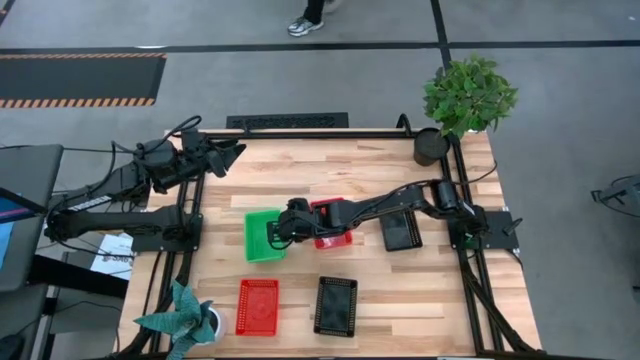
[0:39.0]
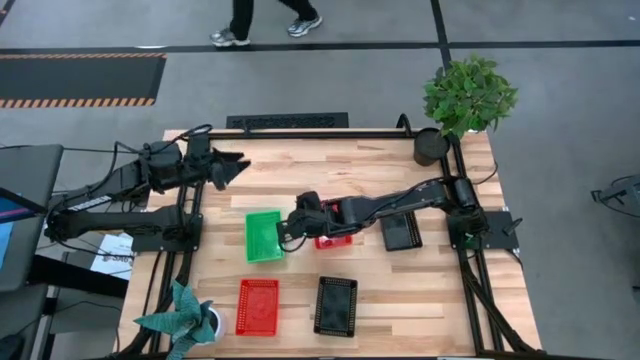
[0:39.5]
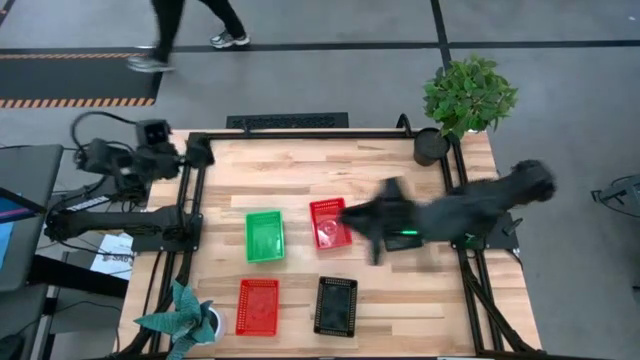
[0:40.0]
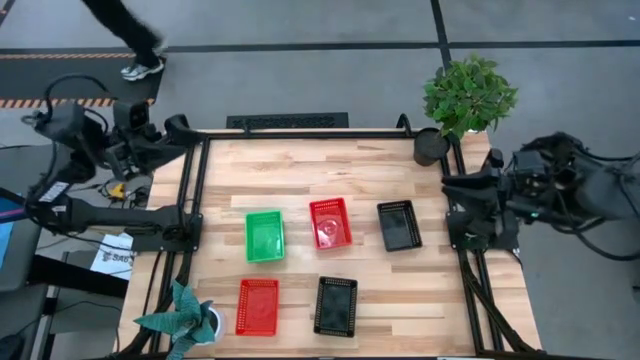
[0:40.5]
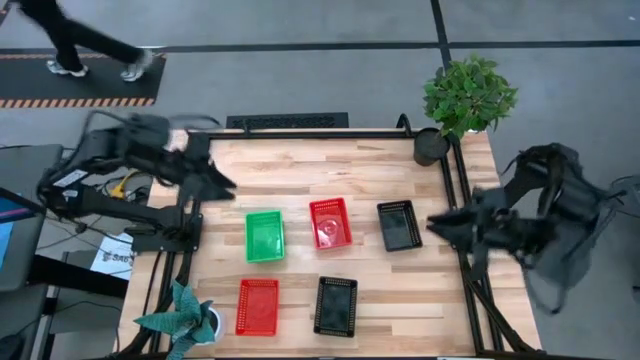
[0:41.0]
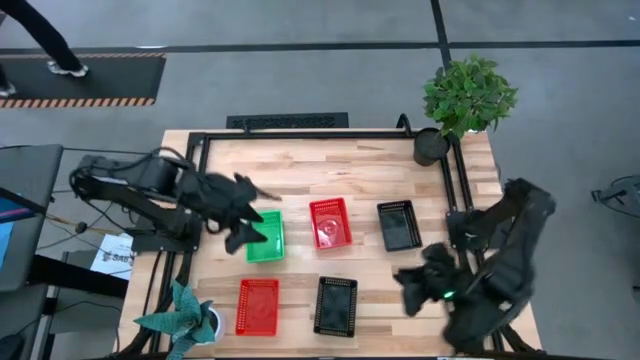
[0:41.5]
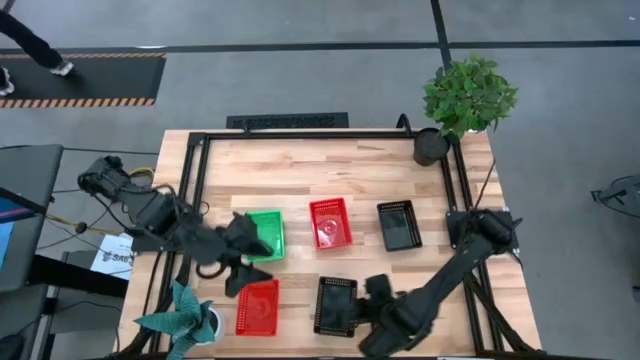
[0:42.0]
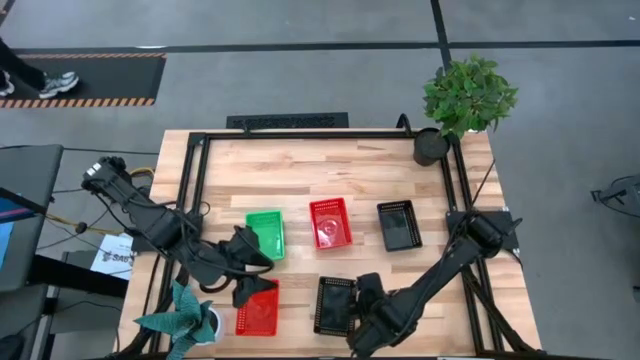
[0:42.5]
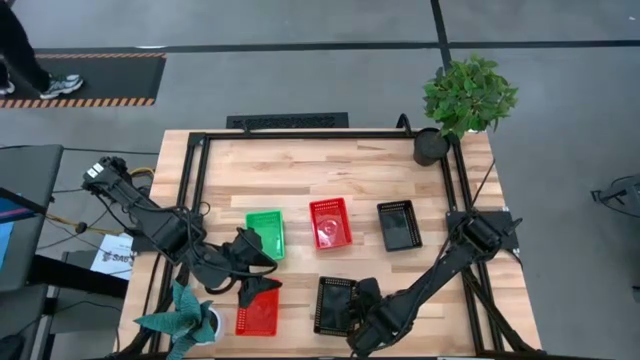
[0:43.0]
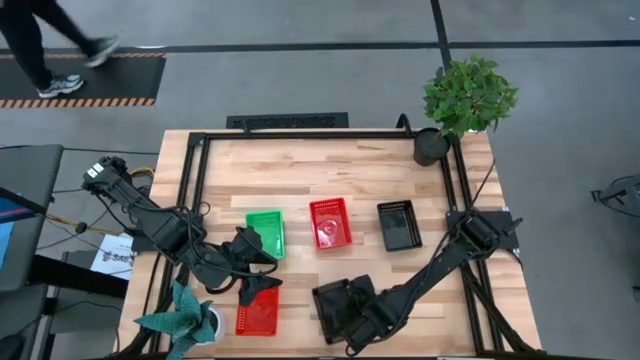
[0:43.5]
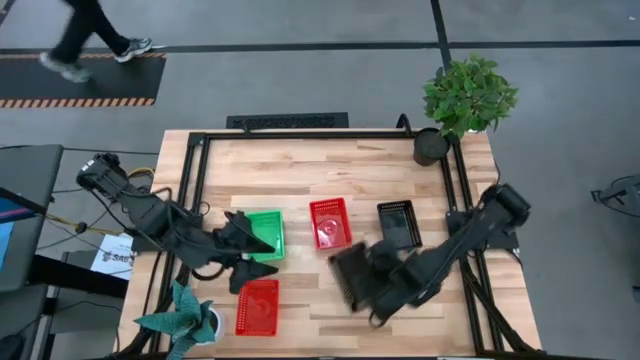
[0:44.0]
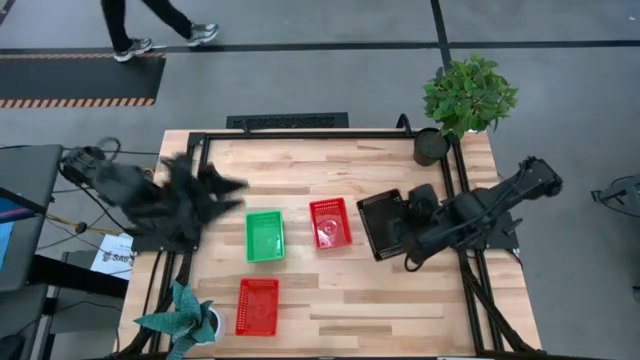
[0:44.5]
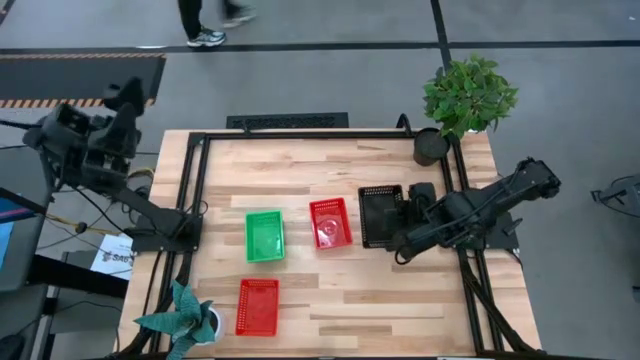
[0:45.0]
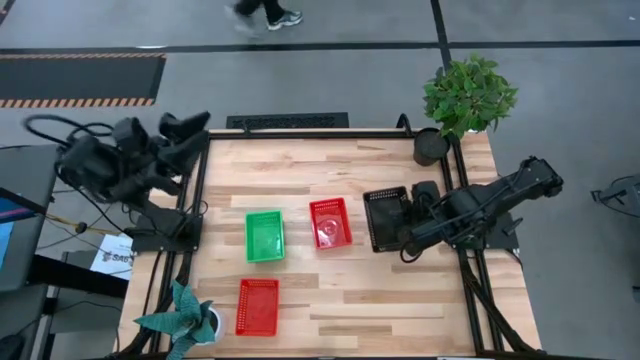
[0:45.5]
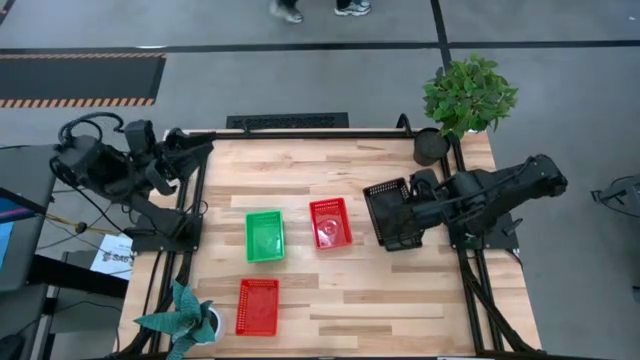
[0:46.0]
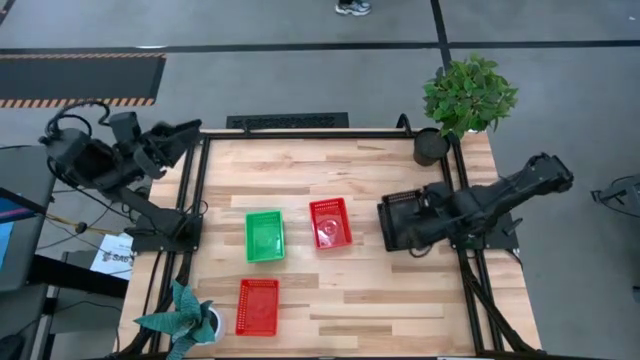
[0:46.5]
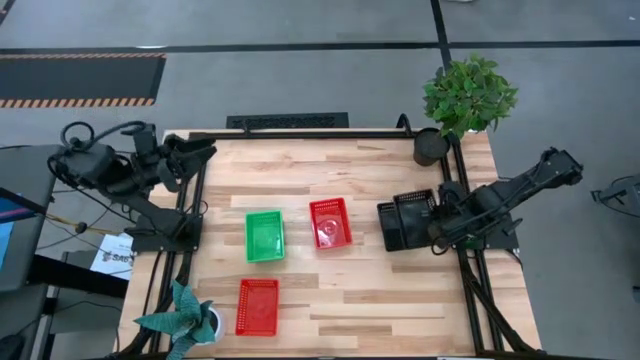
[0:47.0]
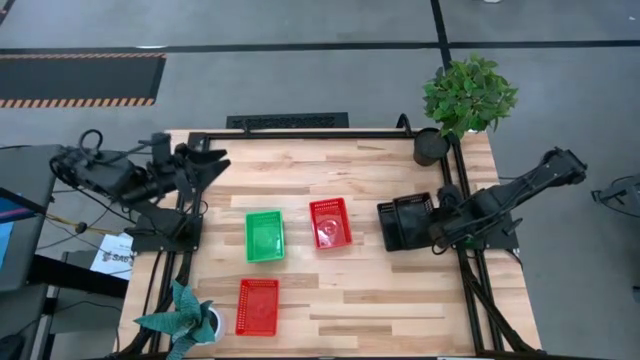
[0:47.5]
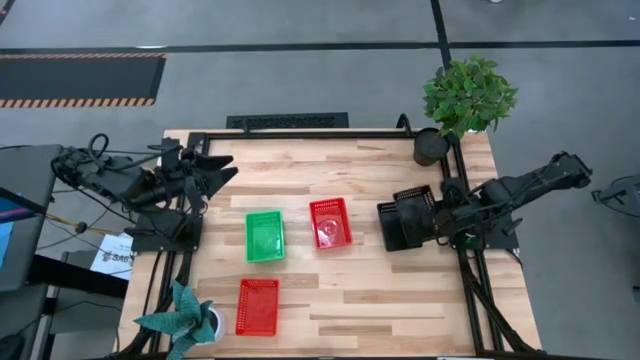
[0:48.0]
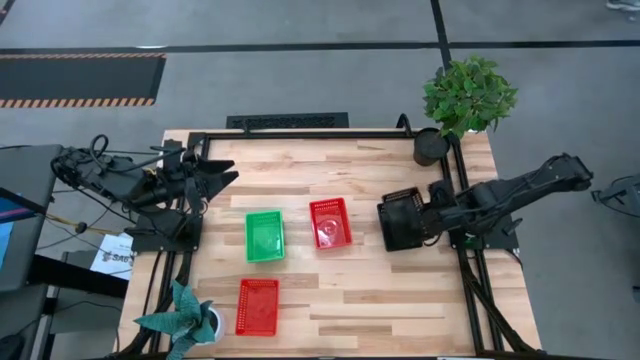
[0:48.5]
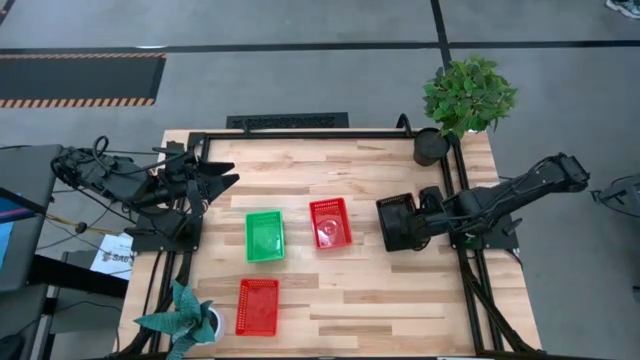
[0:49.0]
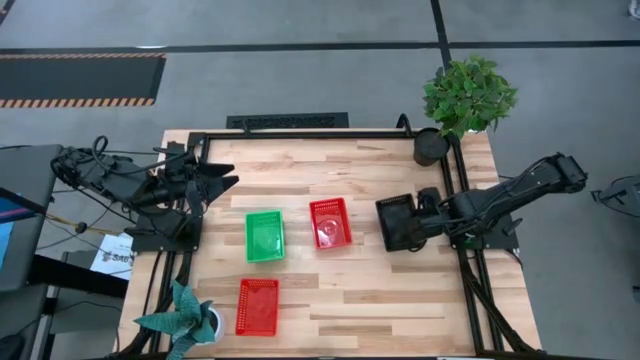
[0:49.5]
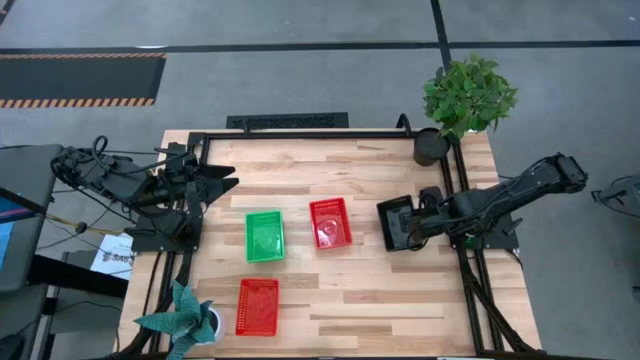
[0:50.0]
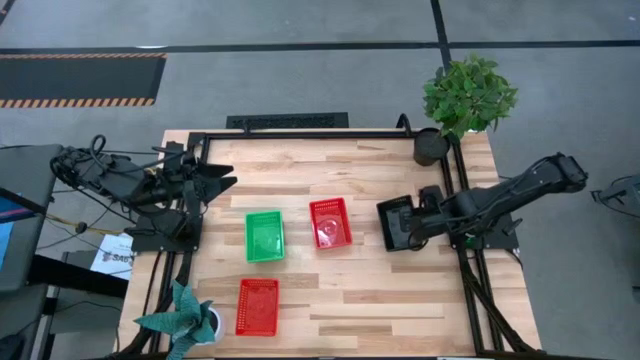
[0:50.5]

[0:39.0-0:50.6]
Stack the bottom black bin on top of the top black bin

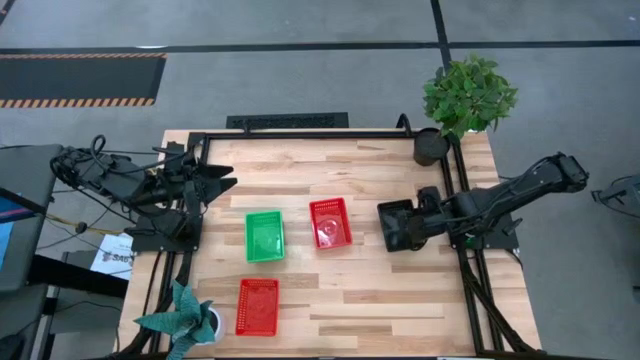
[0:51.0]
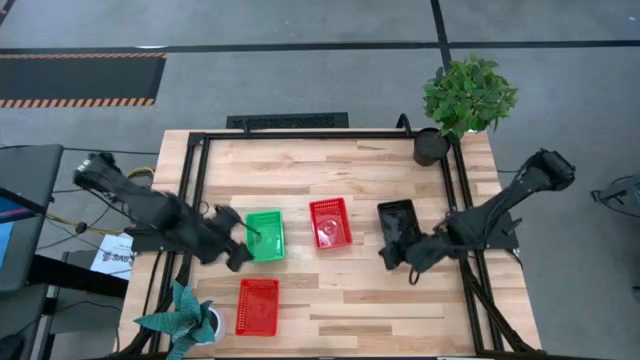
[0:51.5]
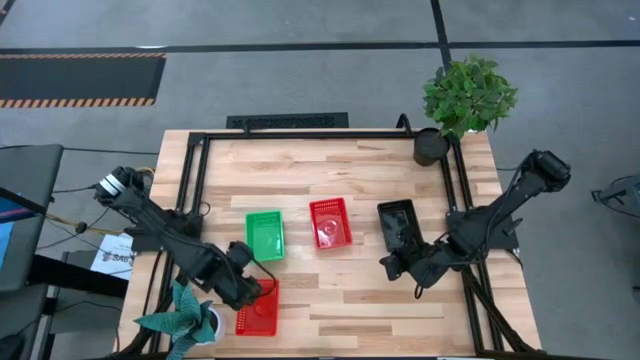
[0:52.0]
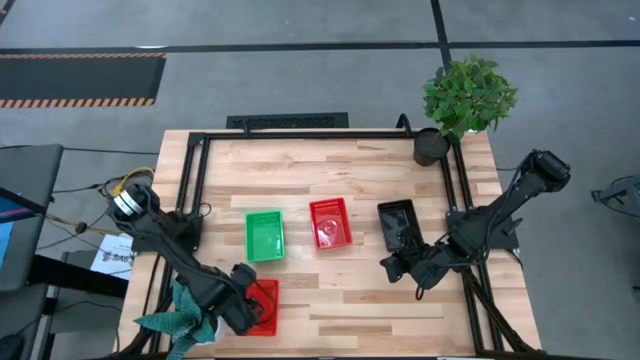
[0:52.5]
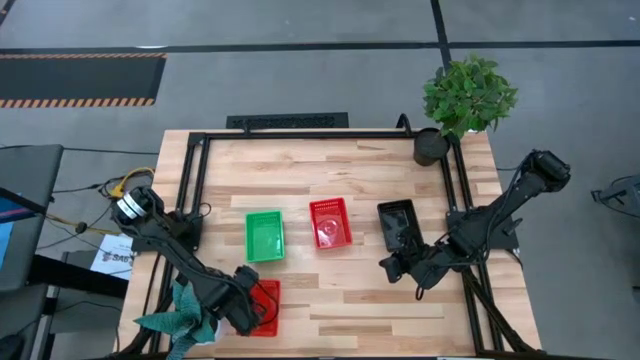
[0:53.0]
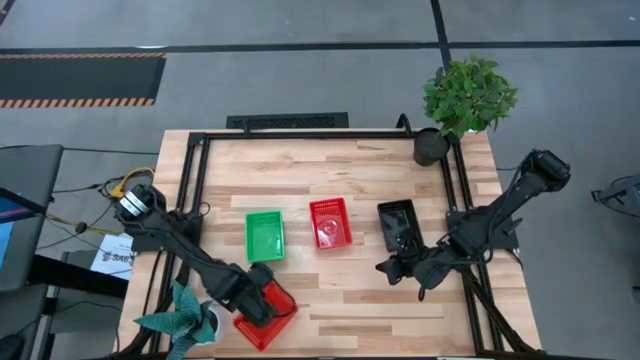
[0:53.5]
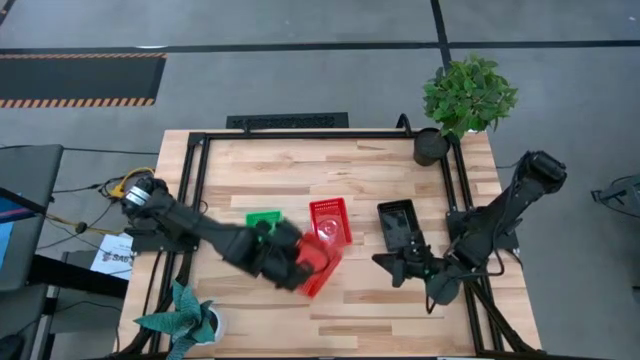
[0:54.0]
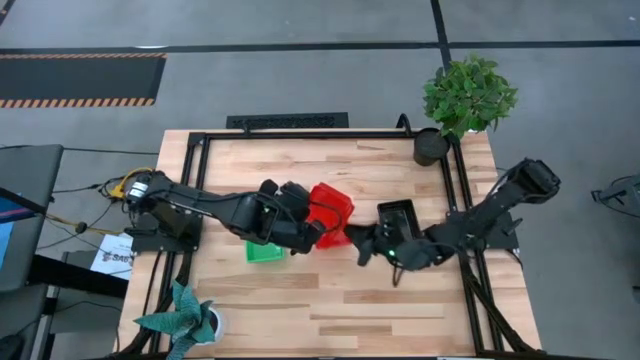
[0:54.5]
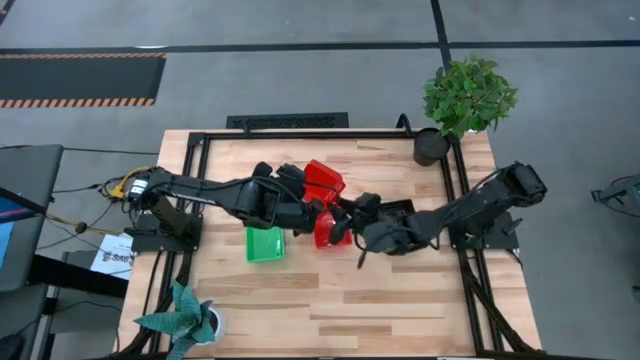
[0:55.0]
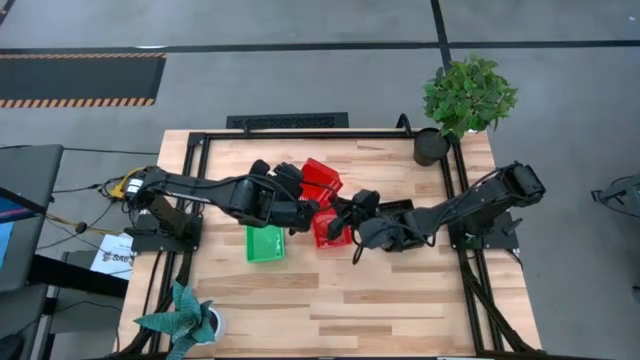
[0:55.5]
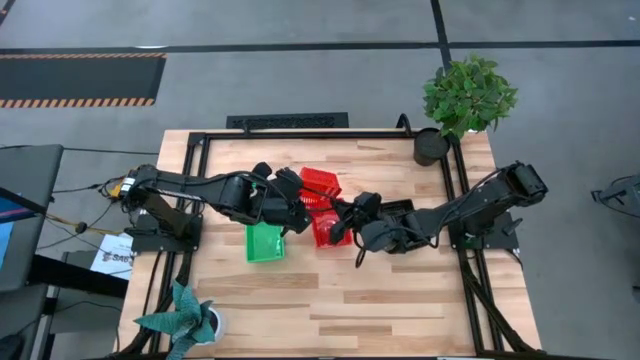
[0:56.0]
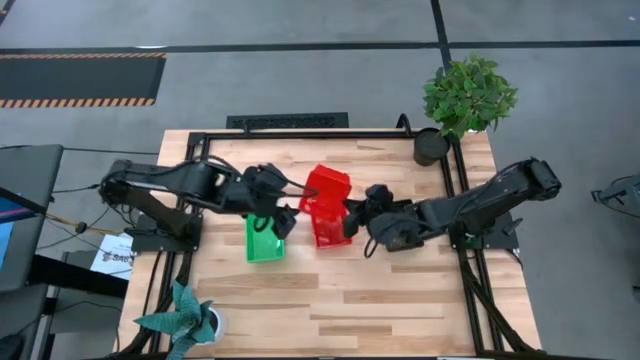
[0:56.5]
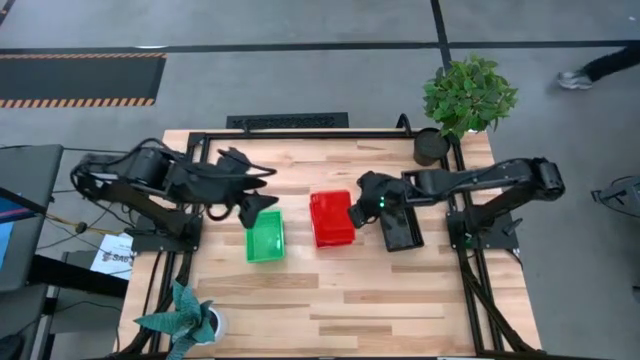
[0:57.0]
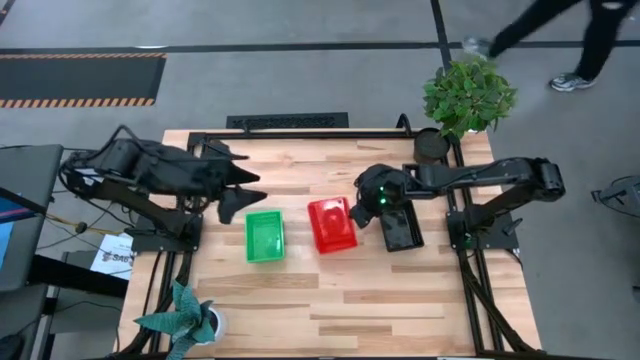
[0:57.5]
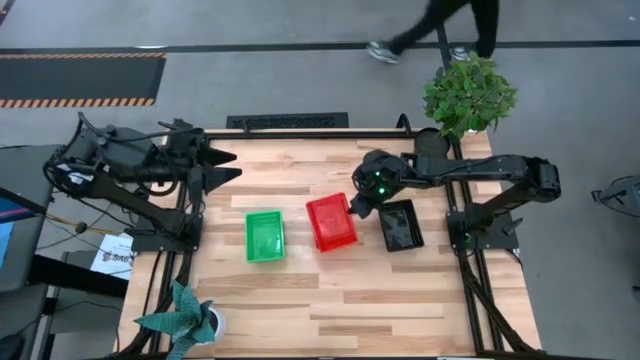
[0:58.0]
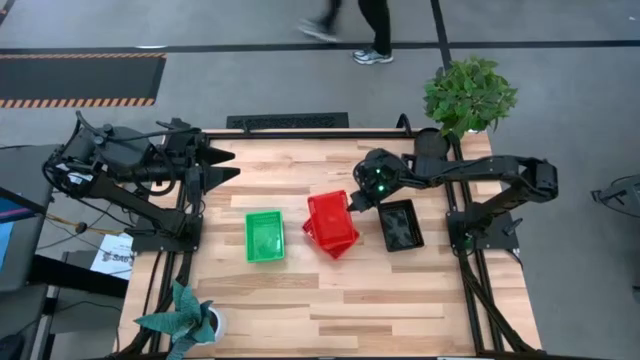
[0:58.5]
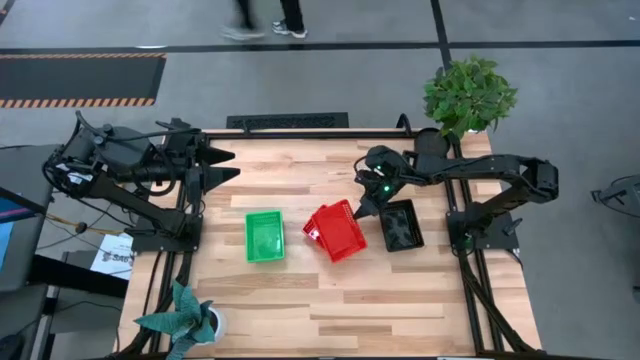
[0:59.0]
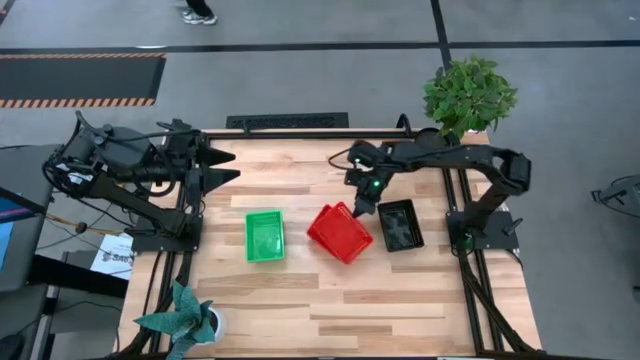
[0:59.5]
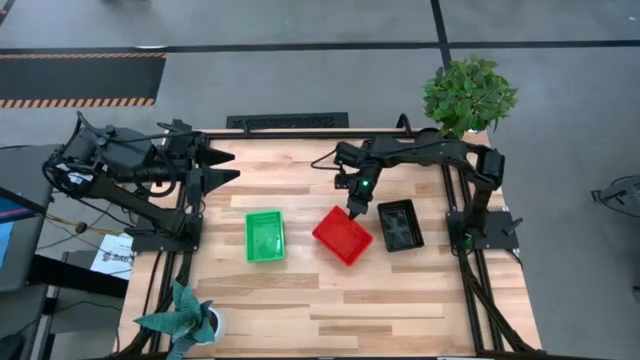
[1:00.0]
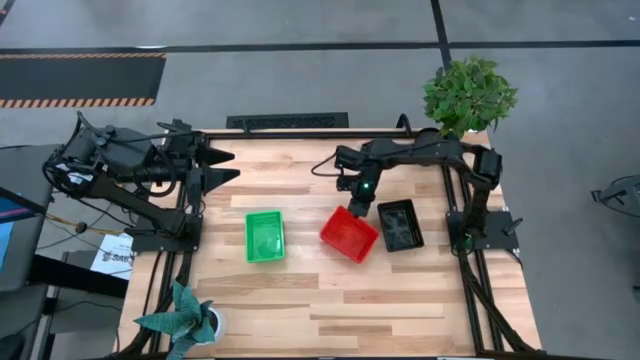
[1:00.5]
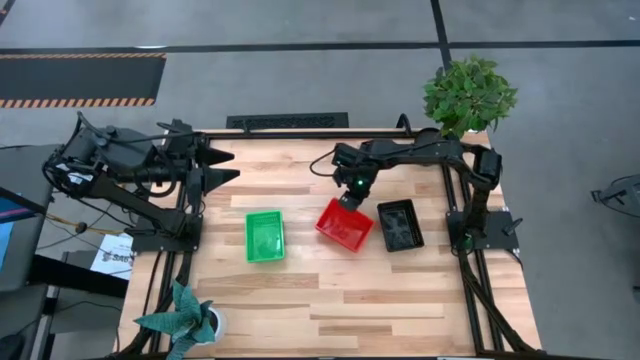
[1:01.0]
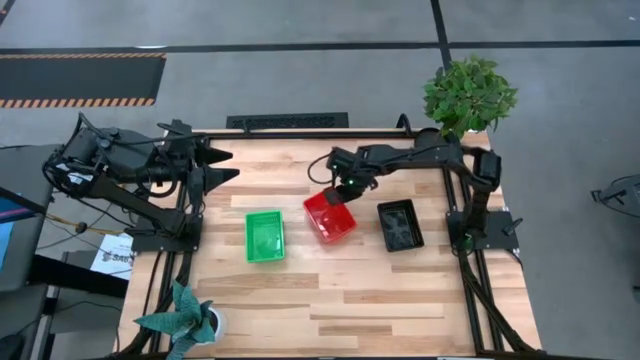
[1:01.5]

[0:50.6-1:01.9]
Stack the bottom red bin on top of the top red bin
